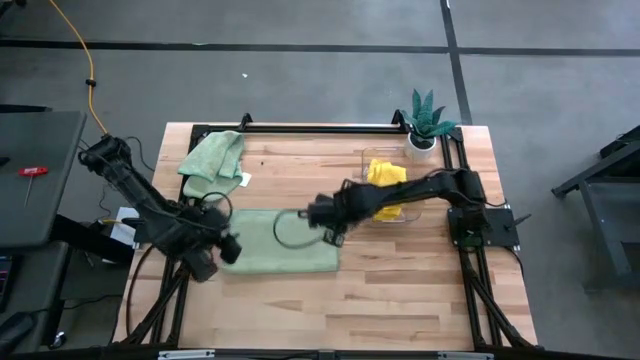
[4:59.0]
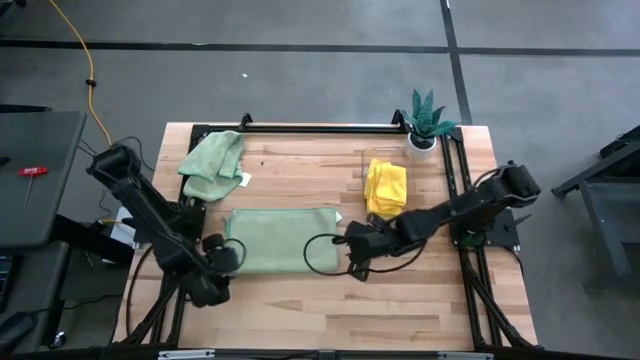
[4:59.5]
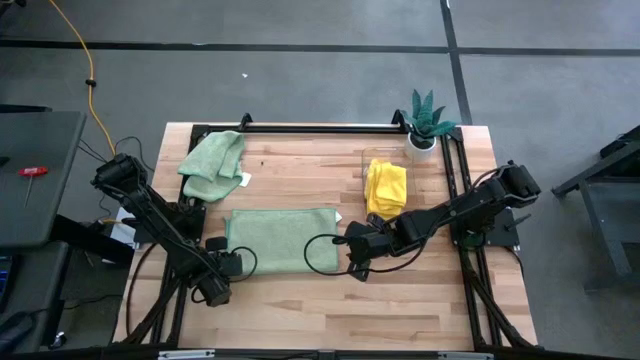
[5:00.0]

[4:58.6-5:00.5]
Task: Fold microfiber towels
Fold the bottom green microfiber towel

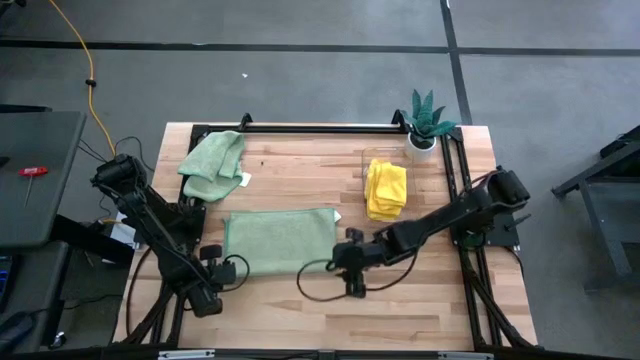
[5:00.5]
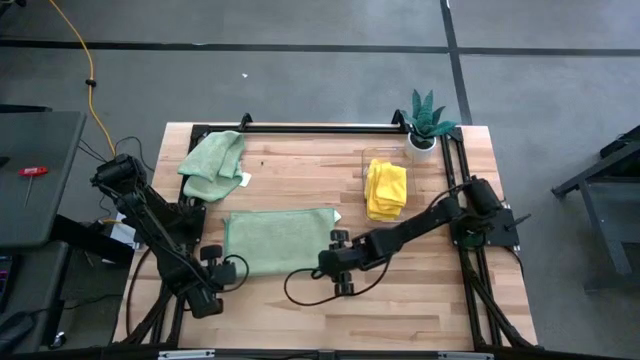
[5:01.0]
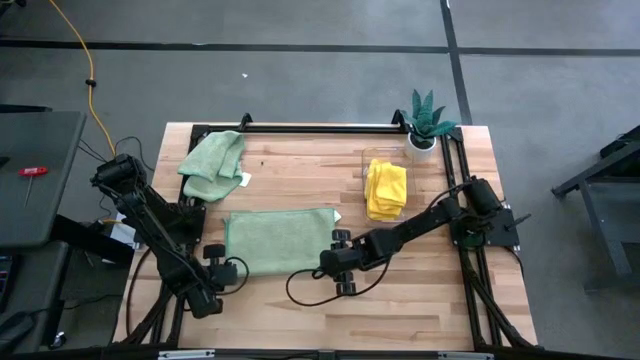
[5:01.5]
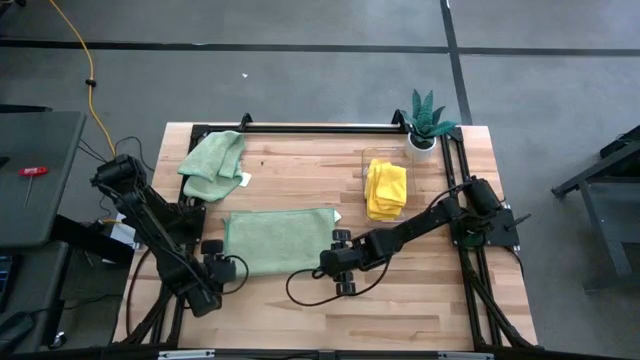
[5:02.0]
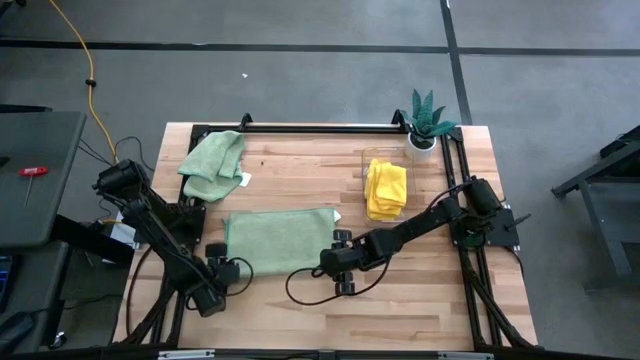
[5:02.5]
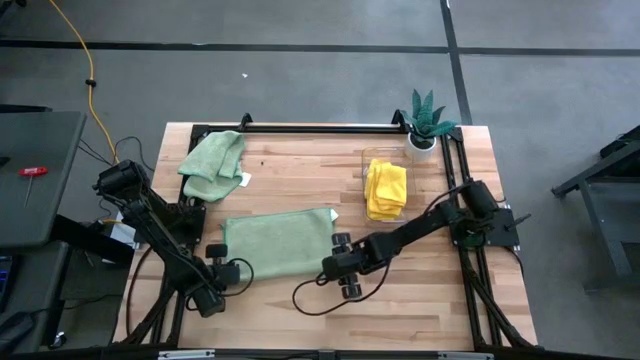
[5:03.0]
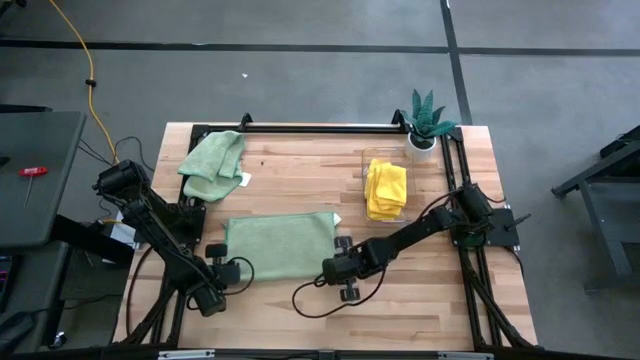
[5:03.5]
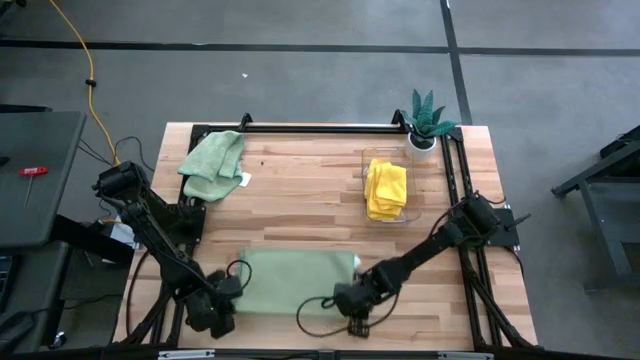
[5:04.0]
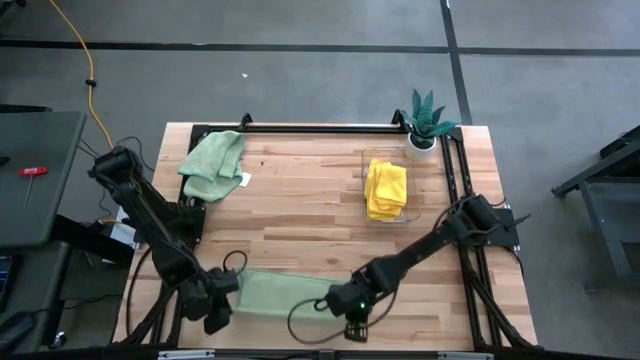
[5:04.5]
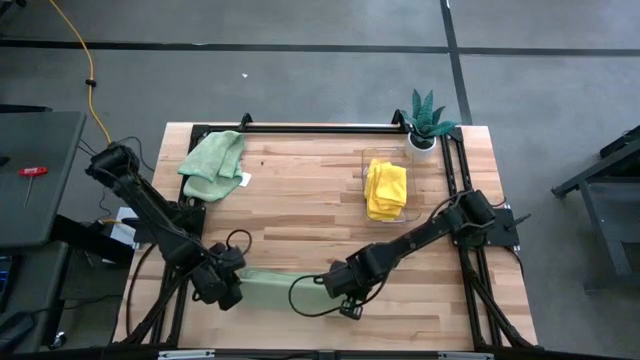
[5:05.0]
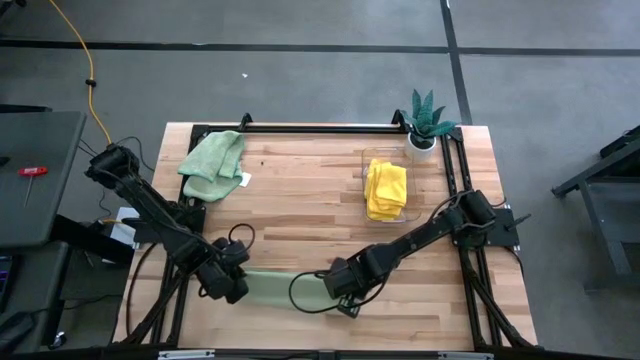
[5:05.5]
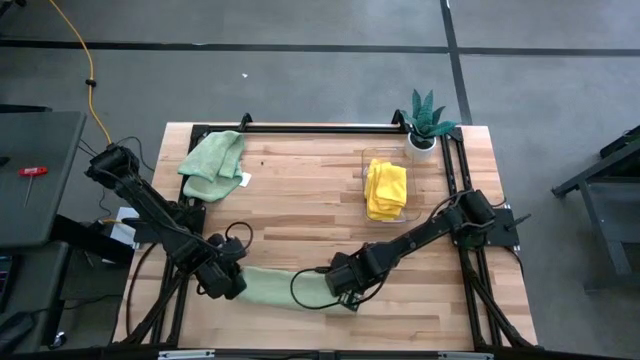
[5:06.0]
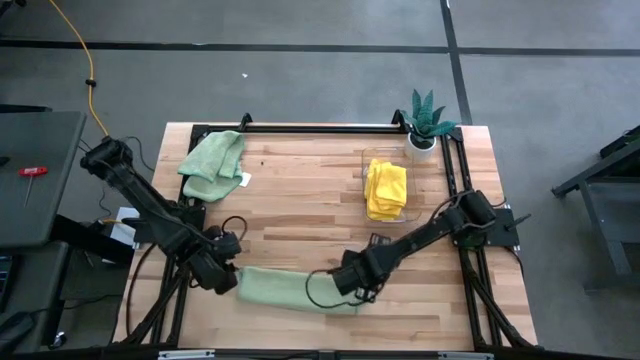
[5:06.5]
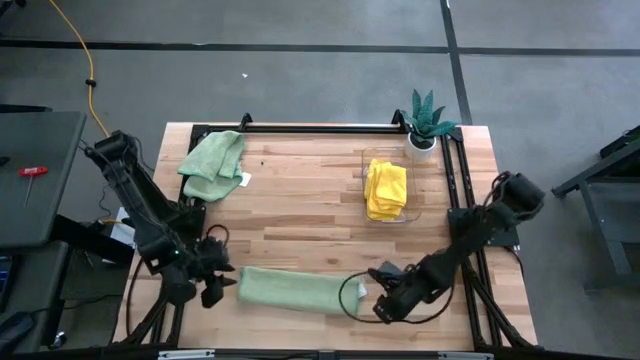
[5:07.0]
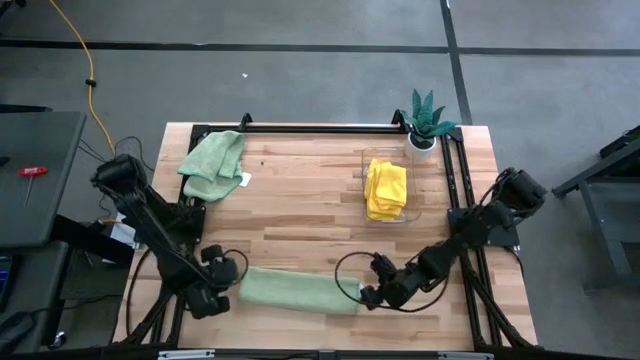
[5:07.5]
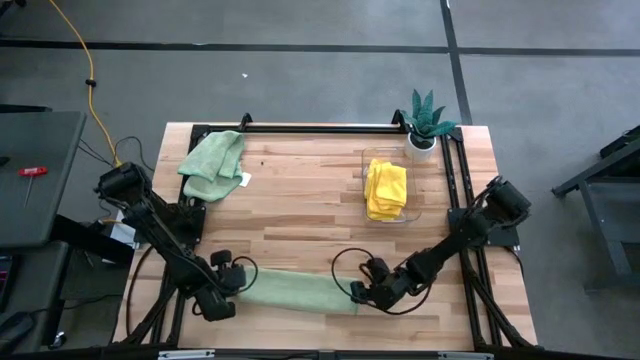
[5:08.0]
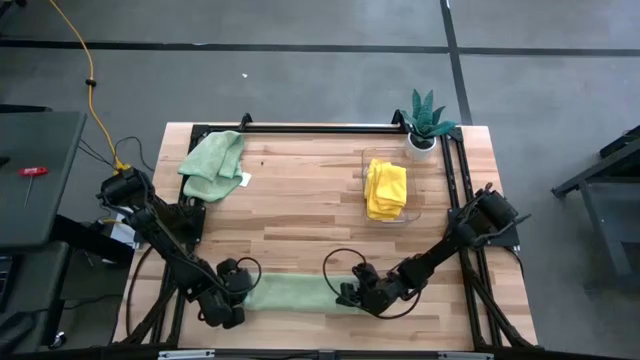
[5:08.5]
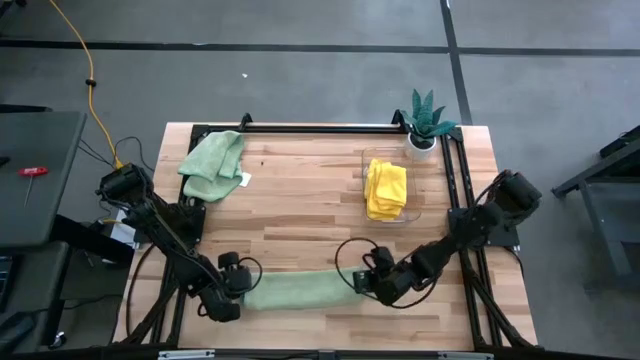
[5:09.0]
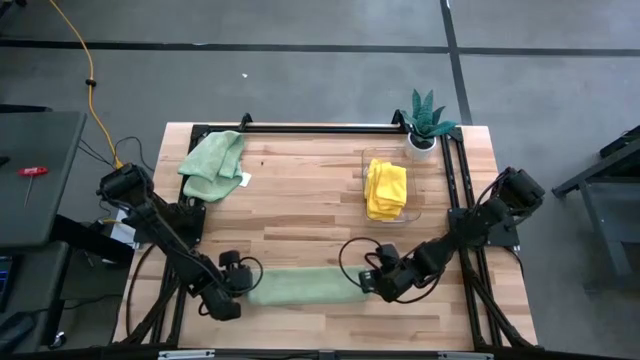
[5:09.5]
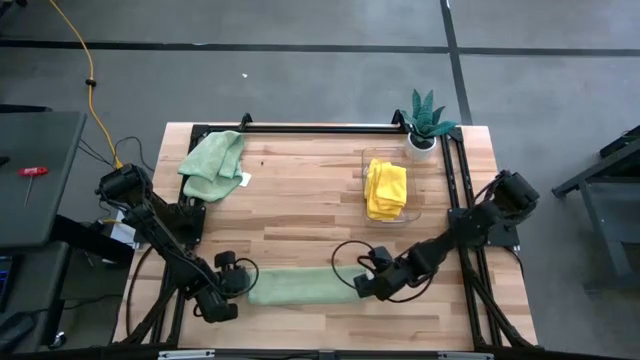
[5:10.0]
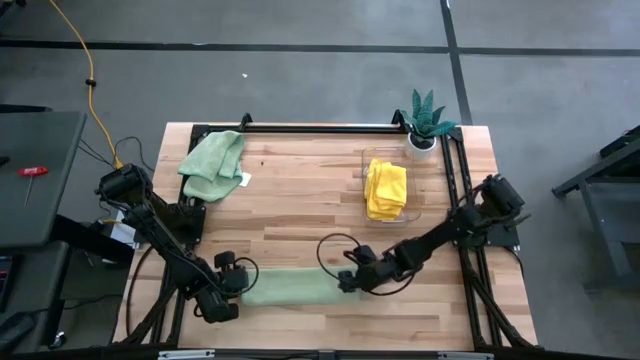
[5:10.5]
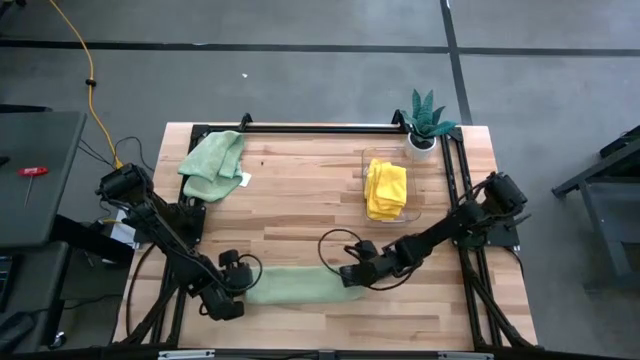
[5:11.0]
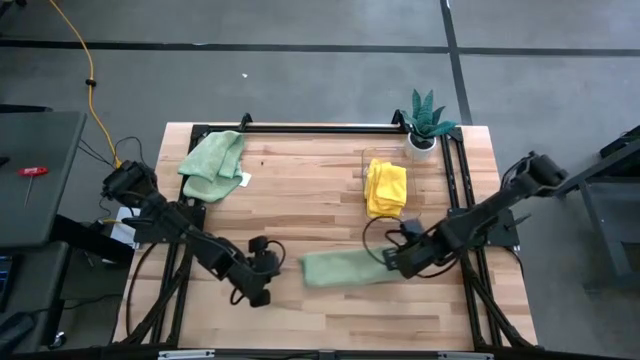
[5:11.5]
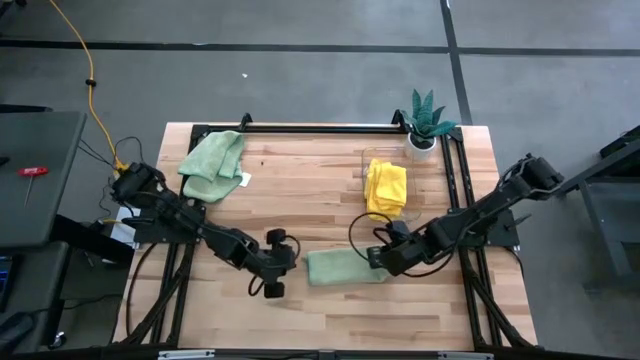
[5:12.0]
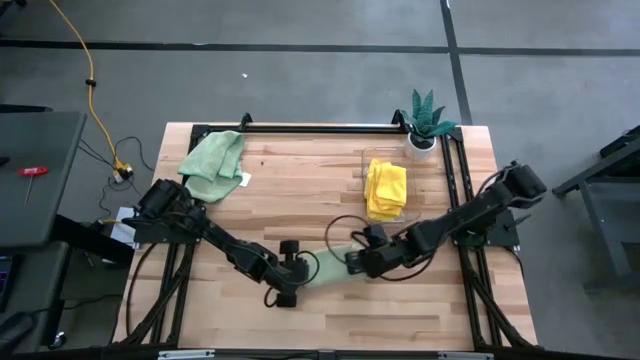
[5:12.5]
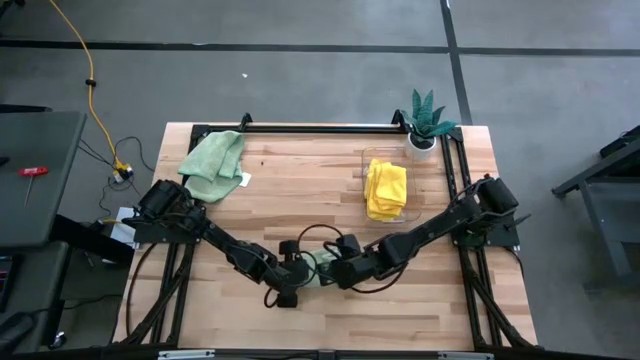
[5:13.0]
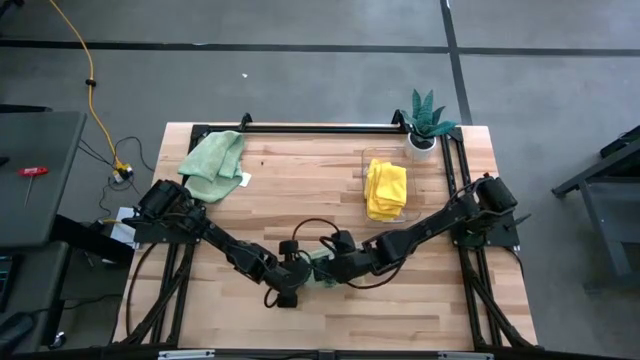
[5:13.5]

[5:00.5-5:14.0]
Fold the bottom green microfiber towel

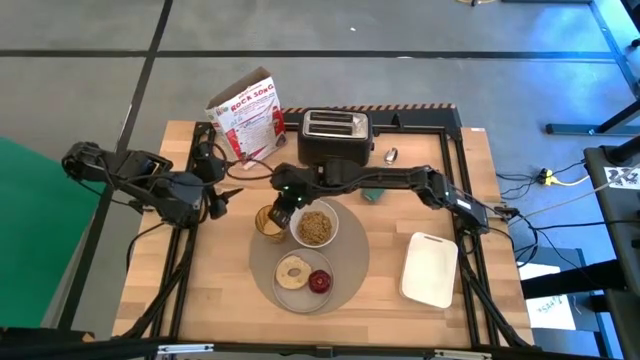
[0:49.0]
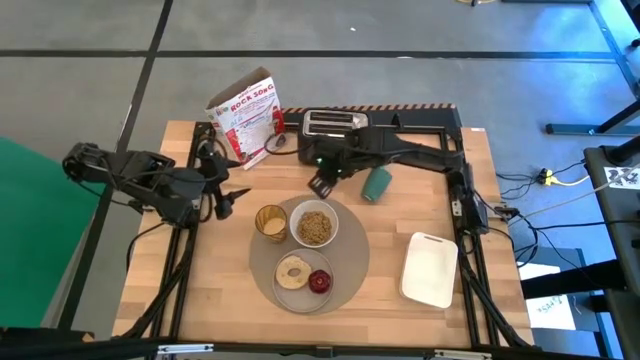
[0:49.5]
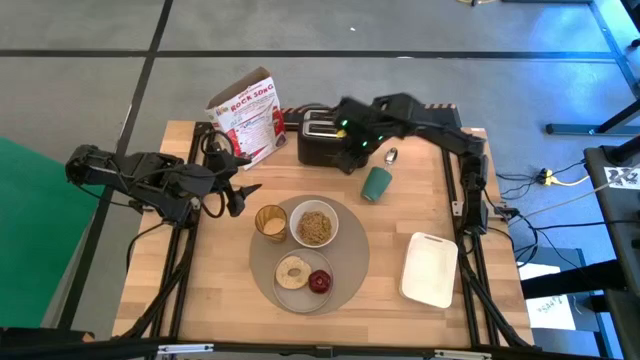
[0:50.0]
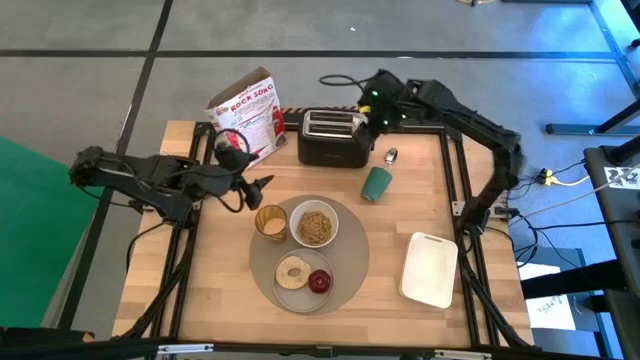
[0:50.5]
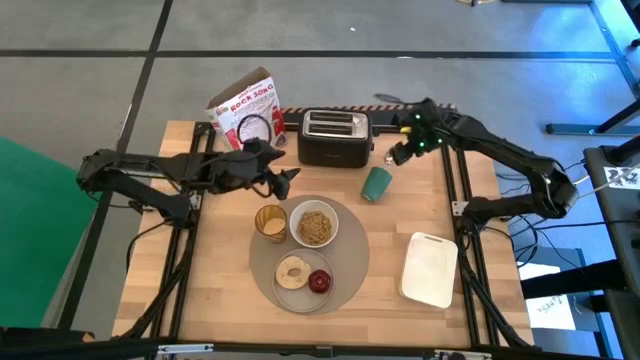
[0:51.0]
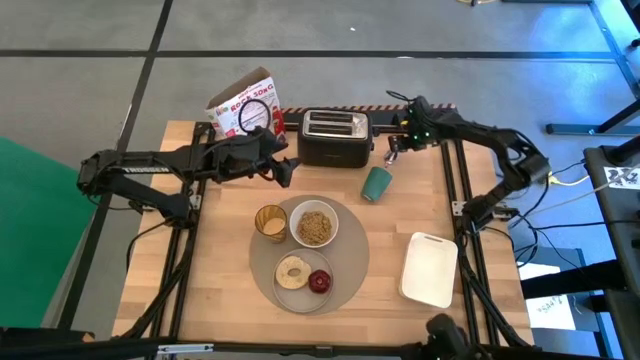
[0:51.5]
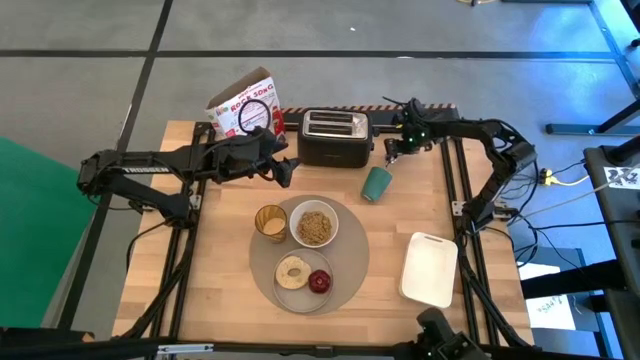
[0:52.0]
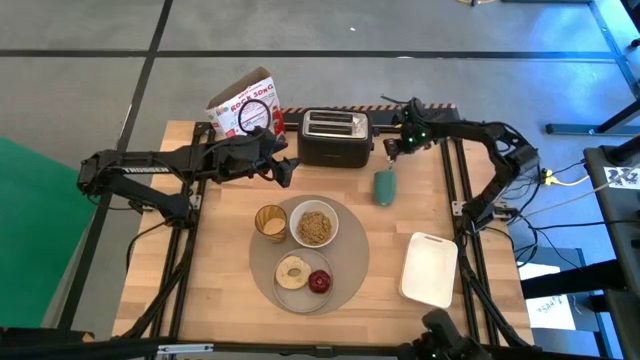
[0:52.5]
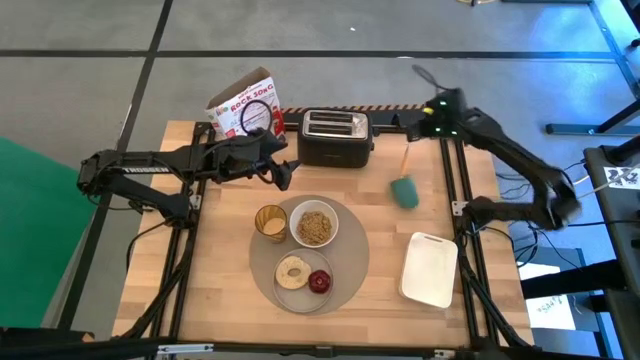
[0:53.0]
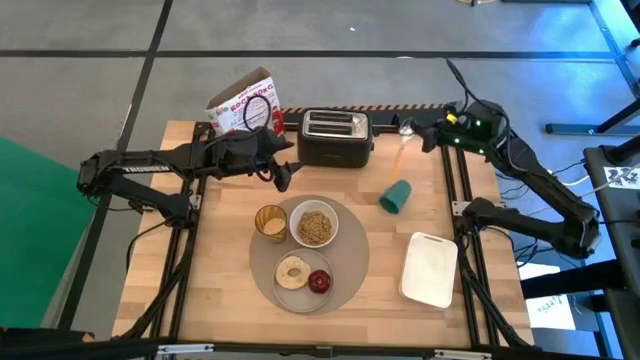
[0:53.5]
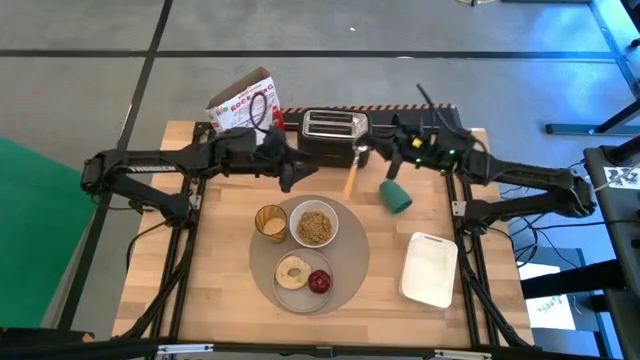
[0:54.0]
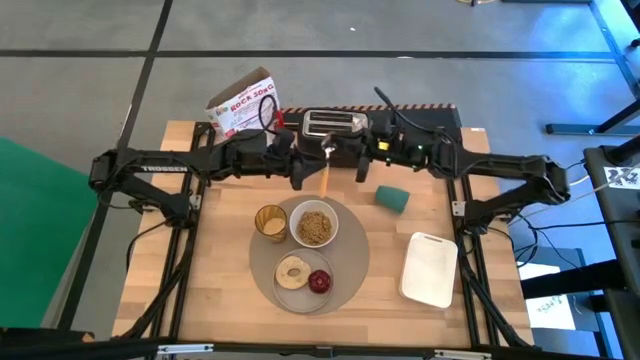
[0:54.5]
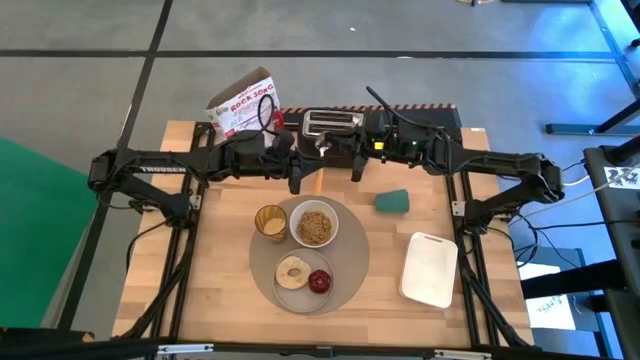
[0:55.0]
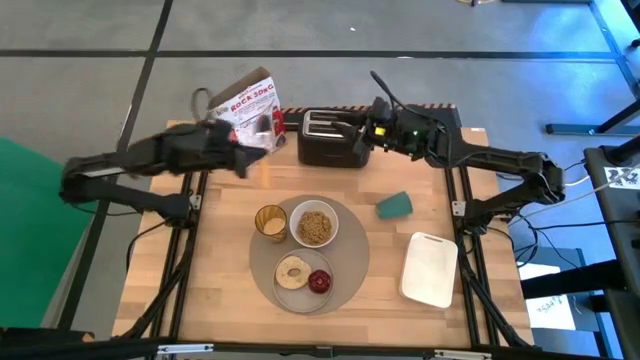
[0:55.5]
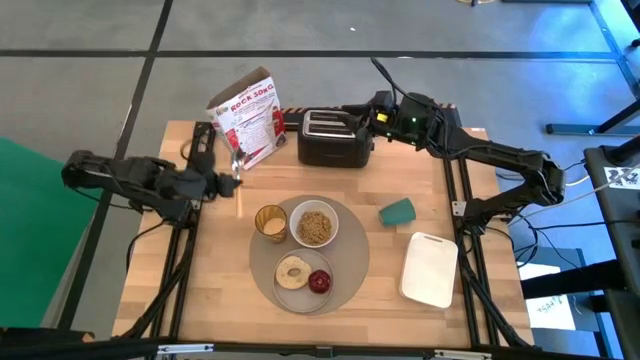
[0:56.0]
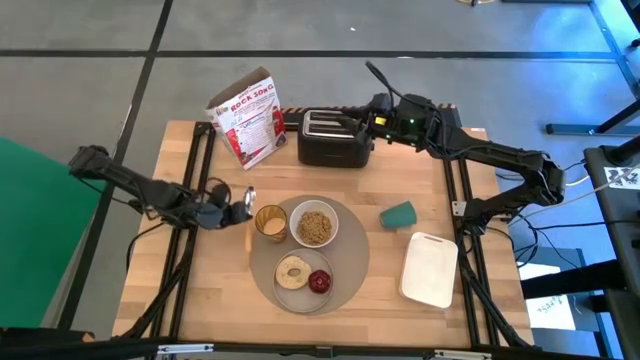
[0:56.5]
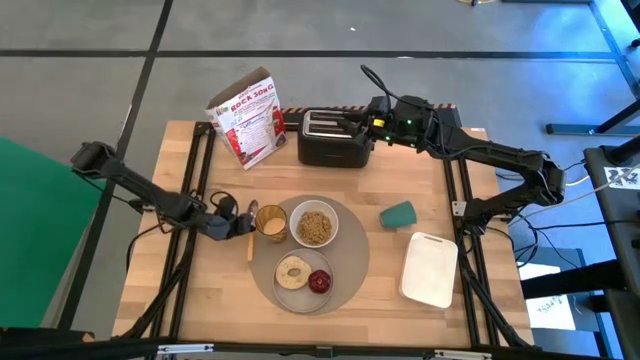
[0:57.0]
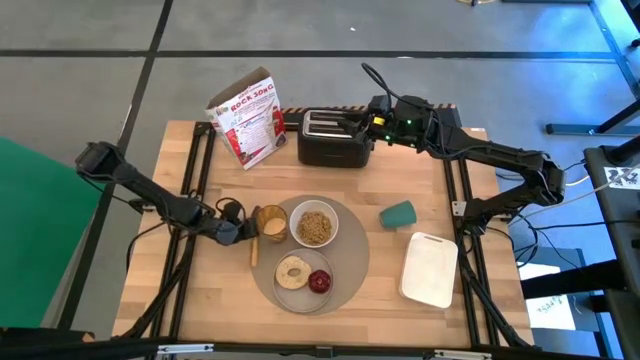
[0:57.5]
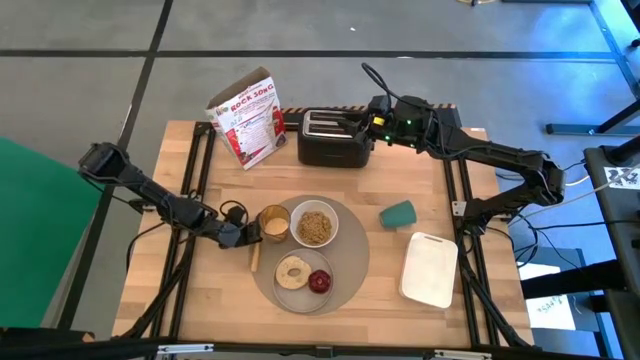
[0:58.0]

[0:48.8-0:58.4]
Task: Arrange a breakfast setting
Put the orange spoon from the green cup on the brown placemat to the left of the orange cup of milk
